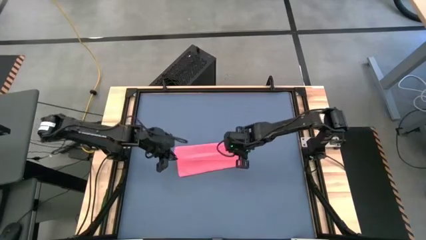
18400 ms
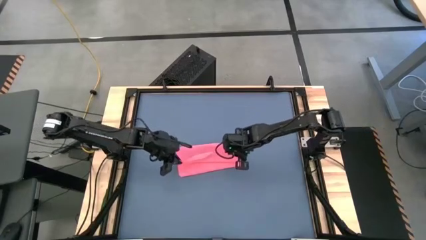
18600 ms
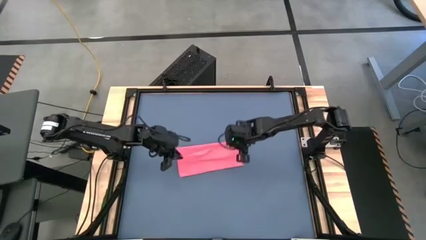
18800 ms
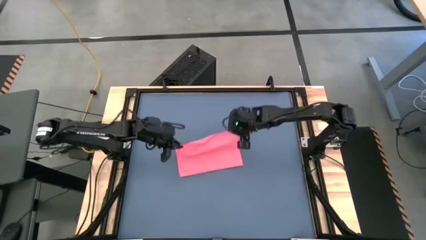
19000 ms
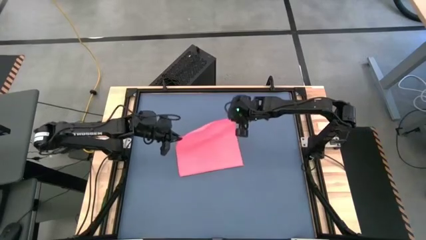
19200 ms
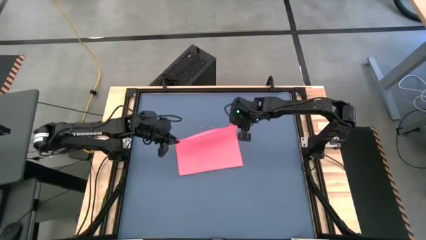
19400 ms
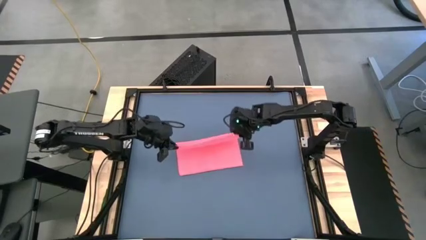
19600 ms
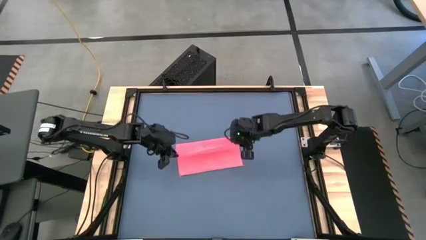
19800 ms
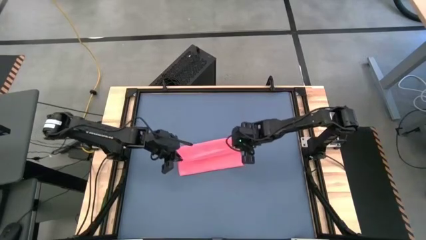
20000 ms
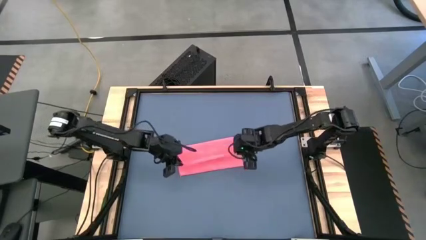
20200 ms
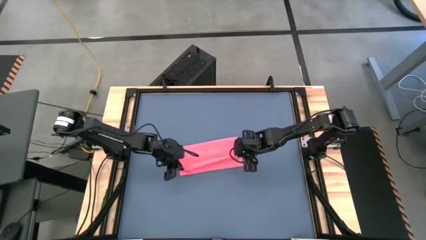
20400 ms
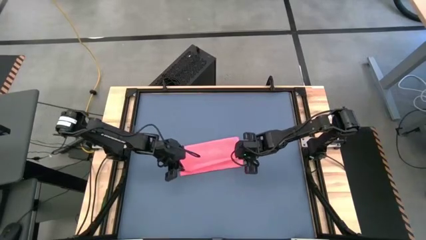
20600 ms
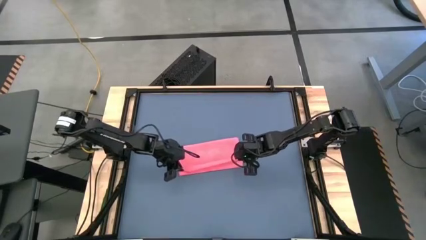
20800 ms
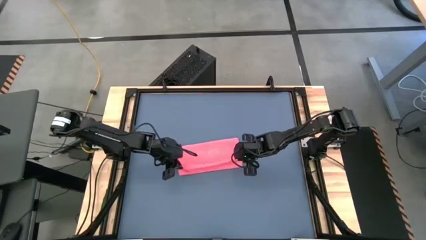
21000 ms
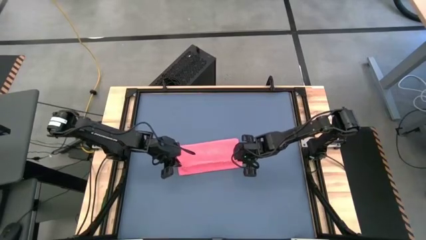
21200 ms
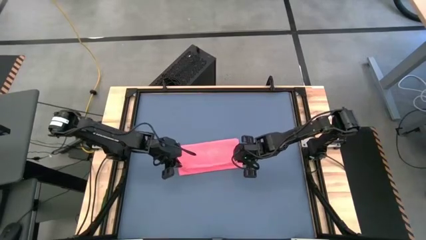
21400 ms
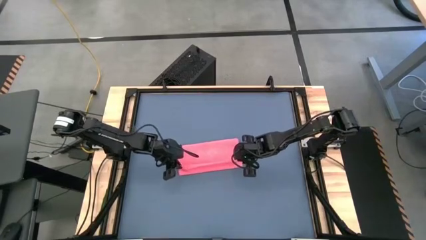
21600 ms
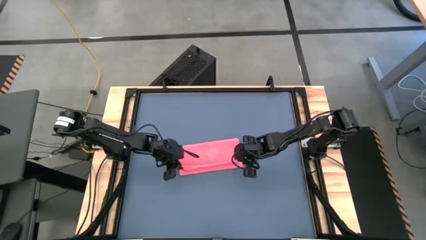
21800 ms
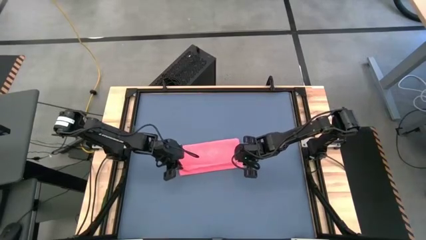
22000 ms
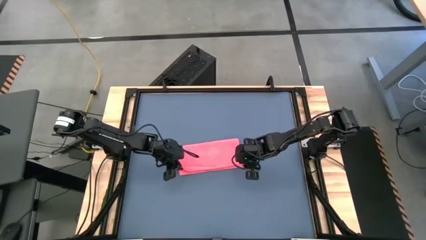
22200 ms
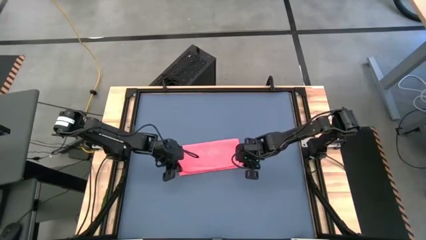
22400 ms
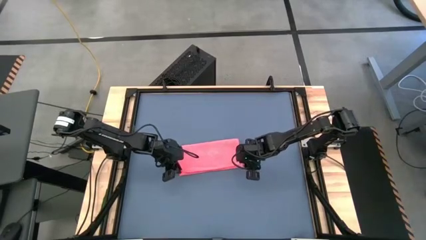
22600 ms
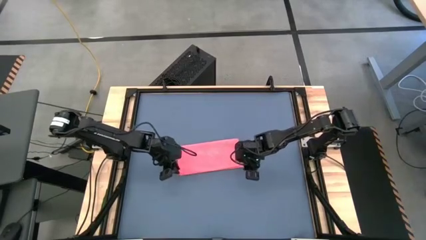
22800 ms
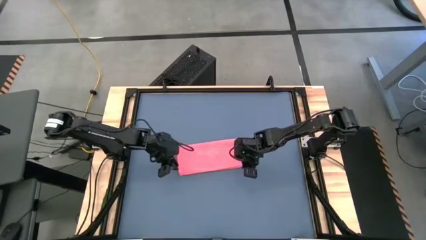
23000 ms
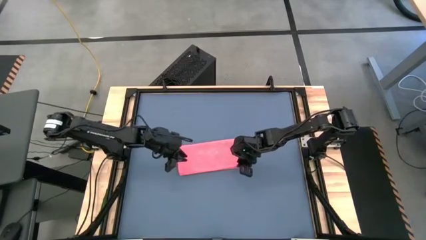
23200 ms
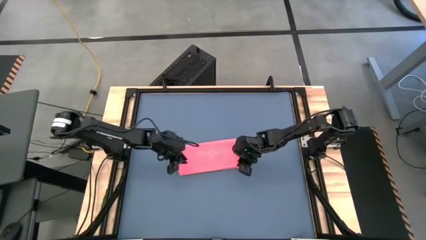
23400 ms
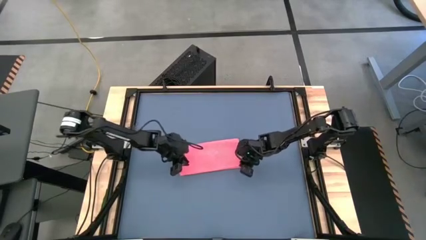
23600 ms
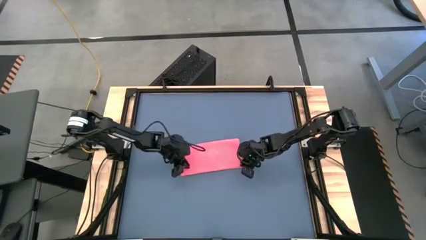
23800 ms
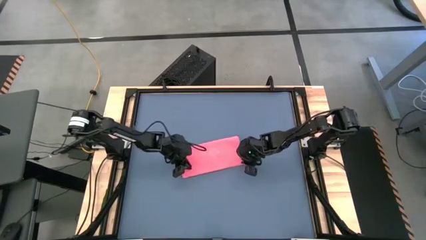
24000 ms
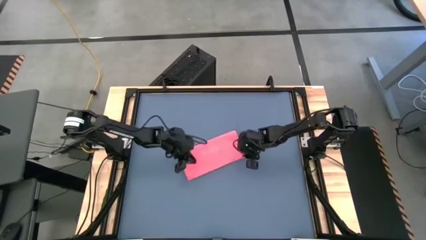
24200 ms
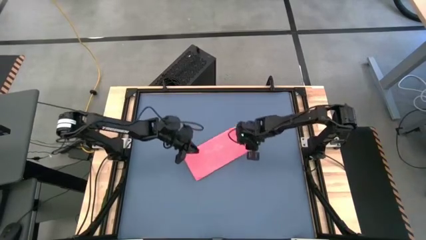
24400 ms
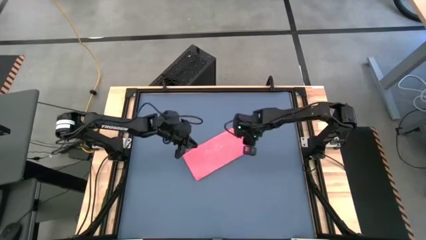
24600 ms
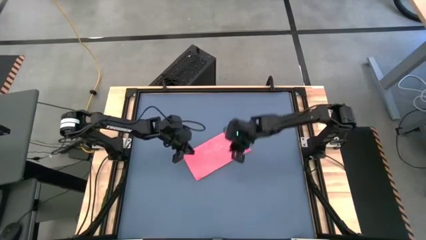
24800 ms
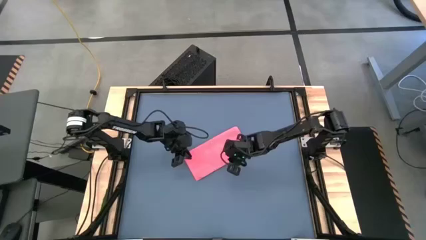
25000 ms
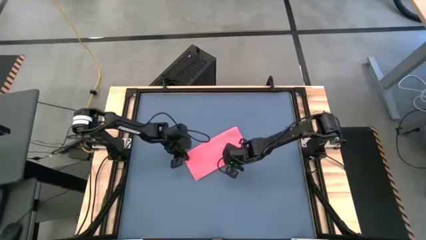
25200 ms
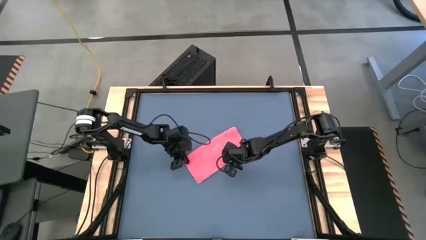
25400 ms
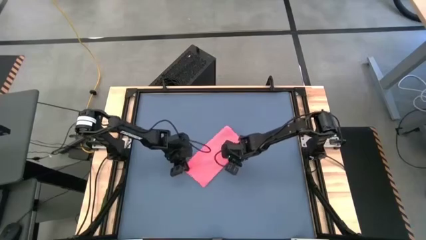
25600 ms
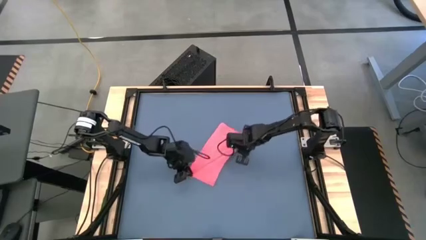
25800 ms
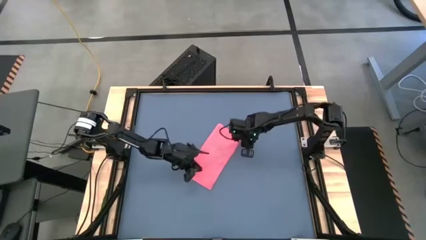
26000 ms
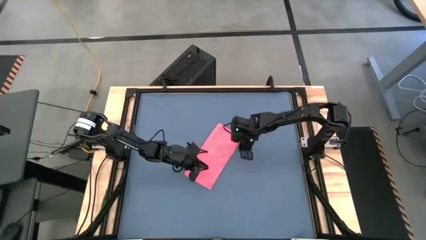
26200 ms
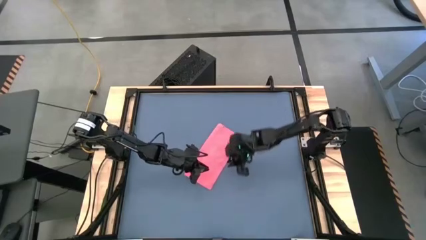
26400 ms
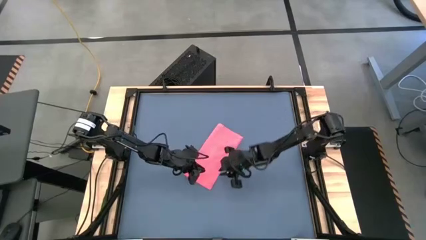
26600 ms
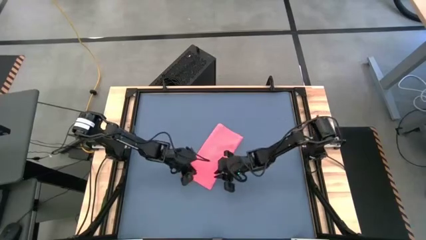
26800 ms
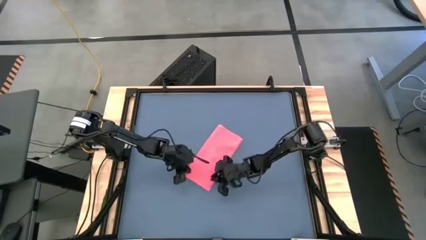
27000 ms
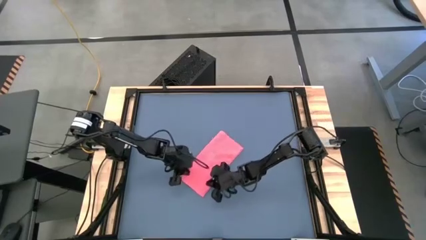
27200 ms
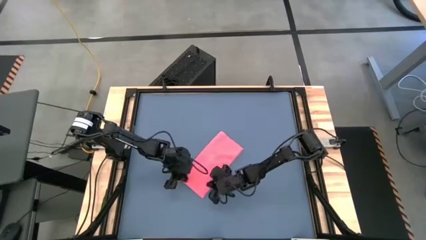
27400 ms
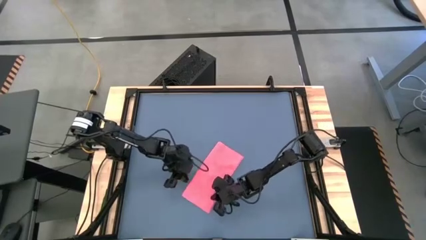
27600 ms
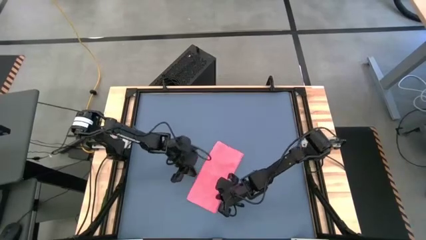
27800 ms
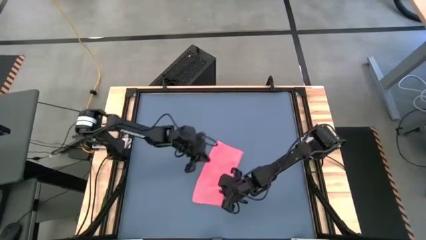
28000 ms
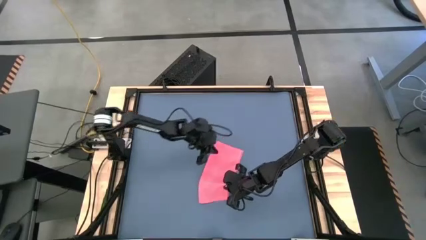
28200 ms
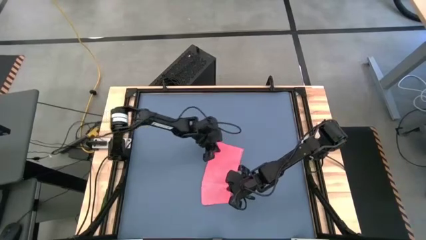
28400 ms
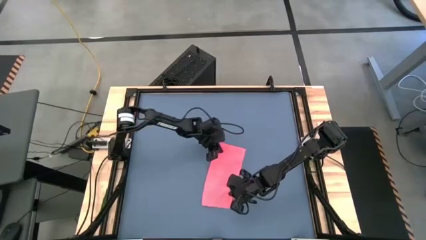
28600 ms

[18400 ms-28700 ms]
Task: Roll towel
Fold the pink towel

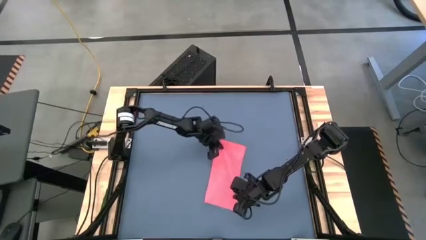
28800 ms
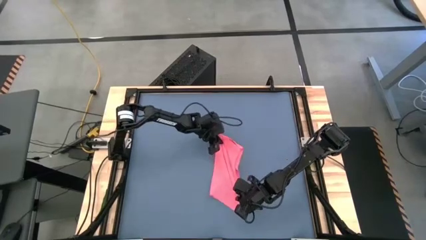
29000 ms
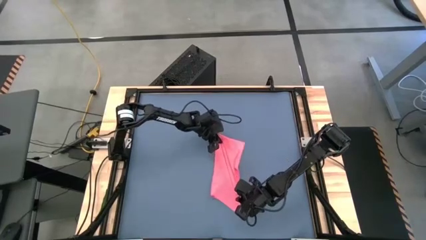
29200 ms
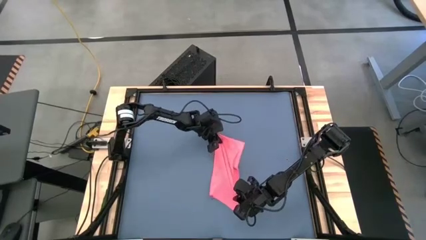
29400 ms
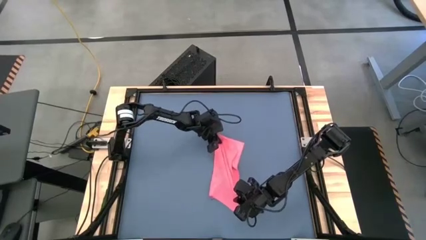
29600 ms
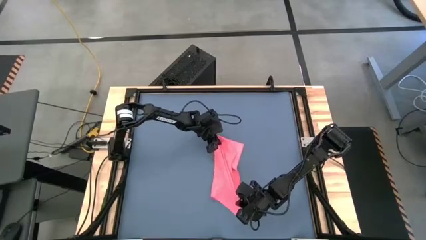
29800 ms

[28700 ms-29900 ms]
Fold the pink towel

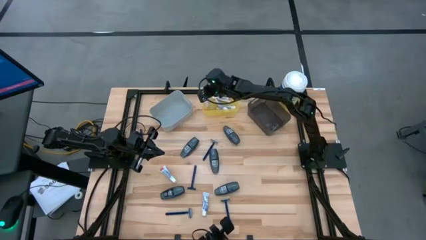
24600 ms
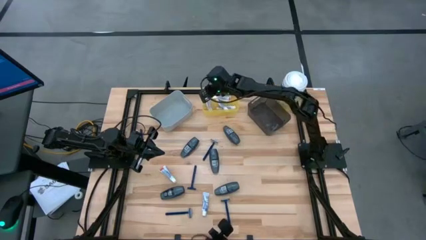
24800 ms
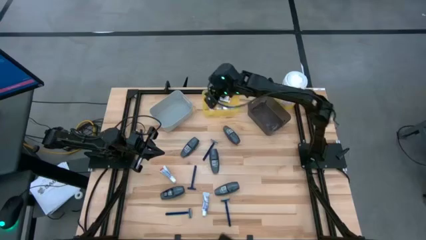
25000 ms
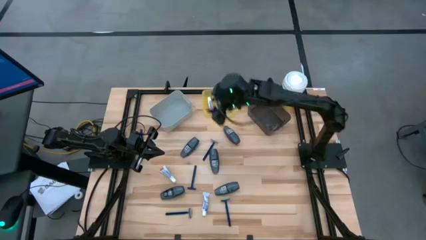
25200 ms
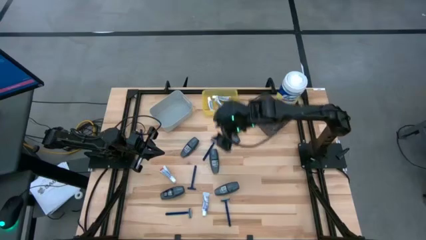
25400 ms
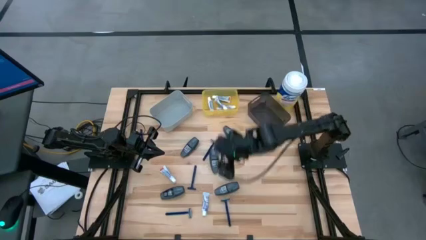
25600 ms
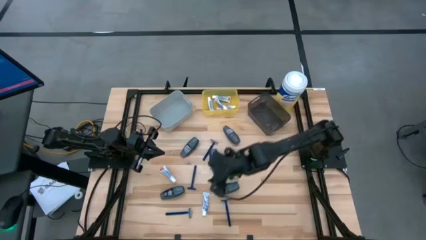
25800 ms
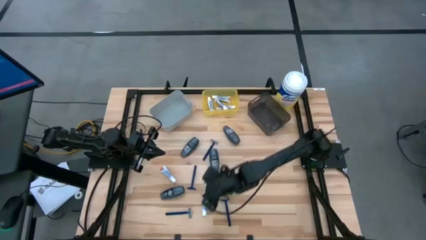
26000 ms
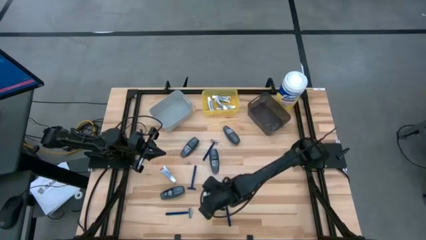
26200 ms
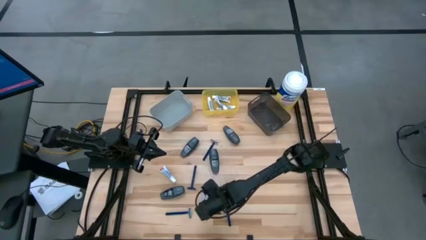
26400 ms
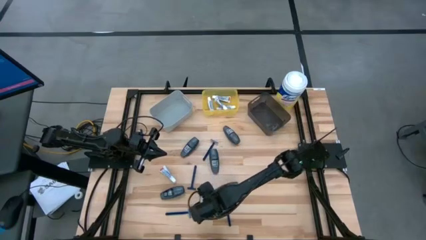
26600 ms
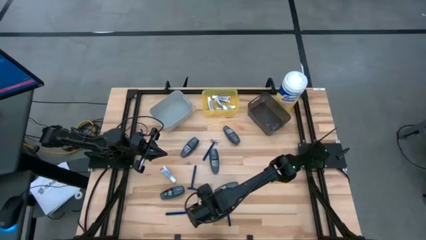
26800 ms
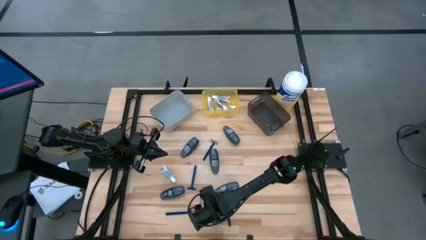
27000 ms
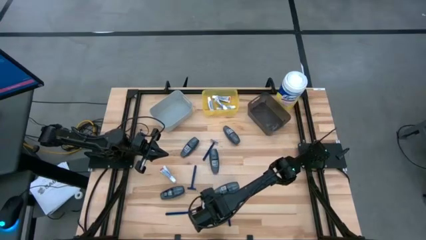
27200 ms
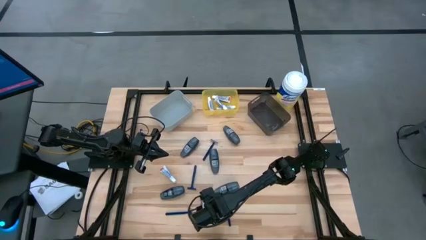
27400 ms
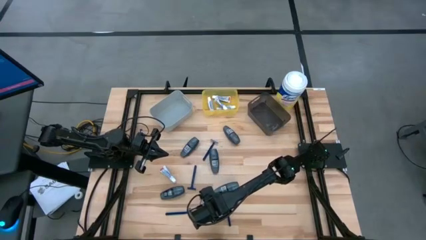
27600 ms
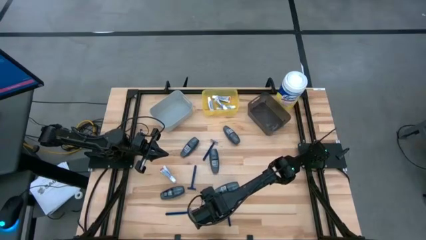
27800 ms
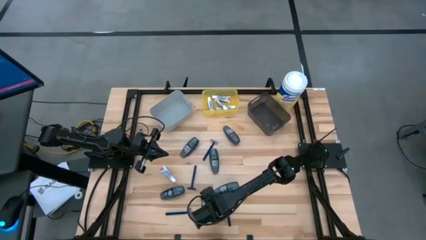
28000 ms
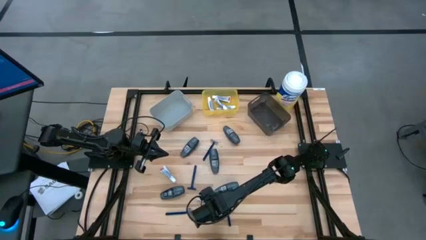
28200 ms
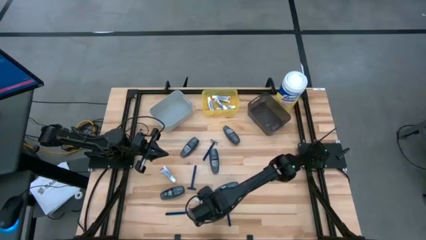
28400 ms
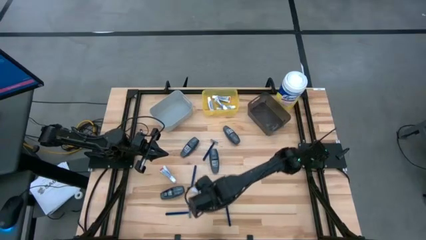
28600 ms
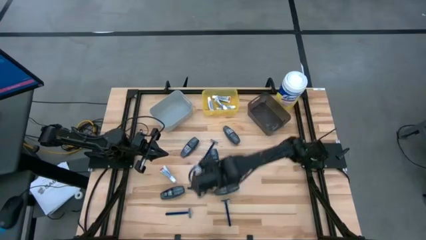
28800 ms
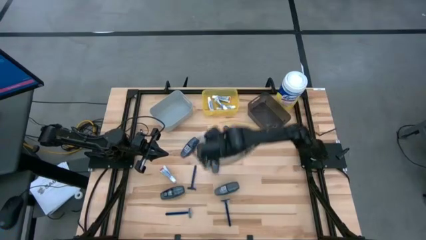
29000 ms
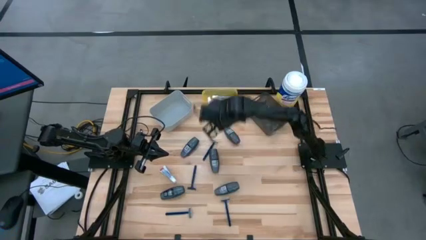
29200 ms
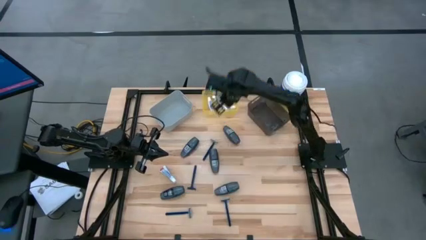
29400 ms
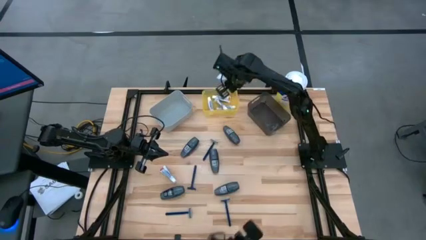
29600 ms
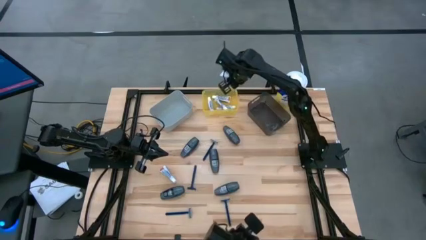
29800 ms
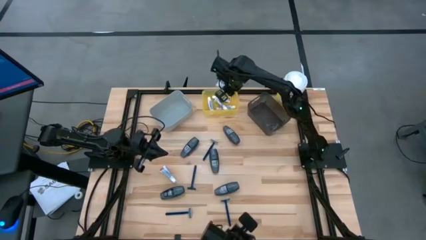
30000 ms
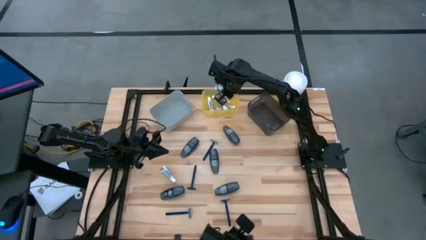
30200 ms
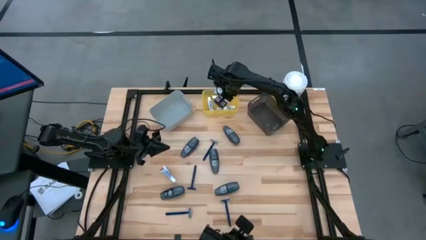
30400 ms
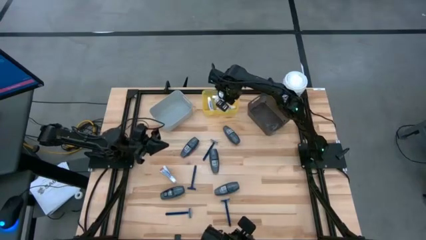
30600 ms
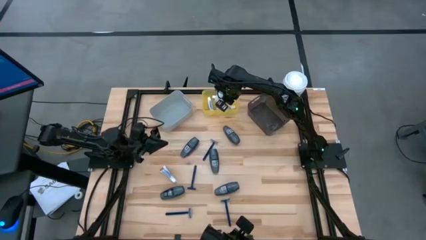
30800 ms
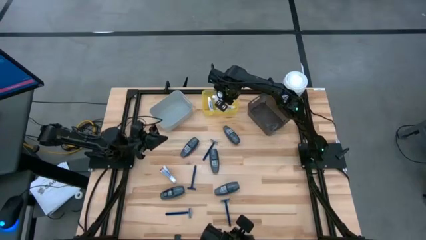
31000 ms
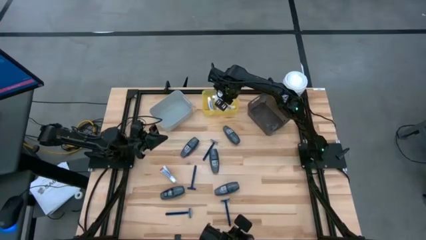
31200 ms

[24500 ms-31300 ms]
Task: Pick & Place Travel size toiletries
Put the white toothpaste into the yellow bin
